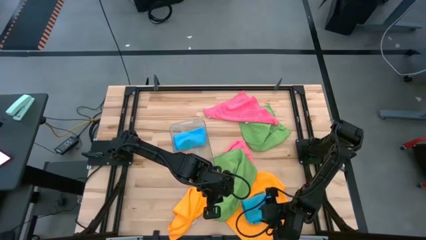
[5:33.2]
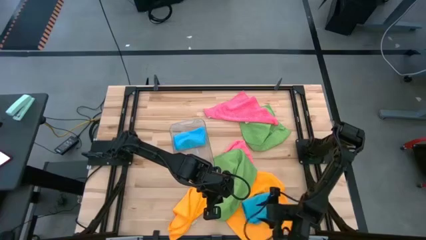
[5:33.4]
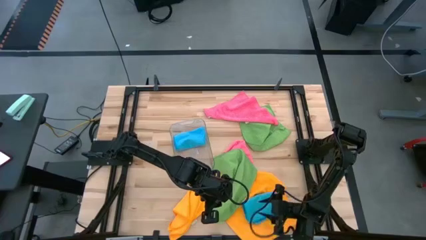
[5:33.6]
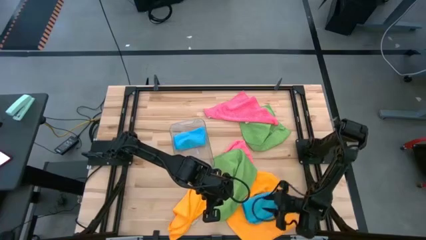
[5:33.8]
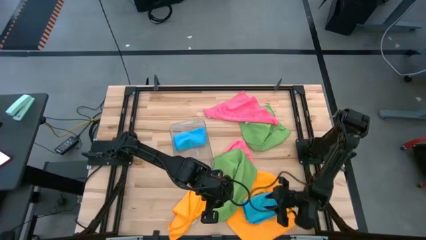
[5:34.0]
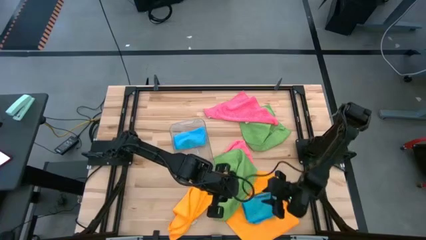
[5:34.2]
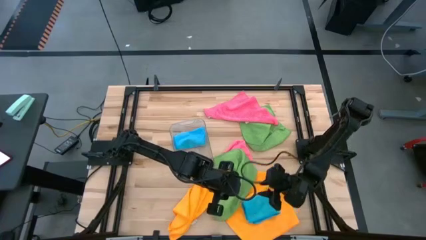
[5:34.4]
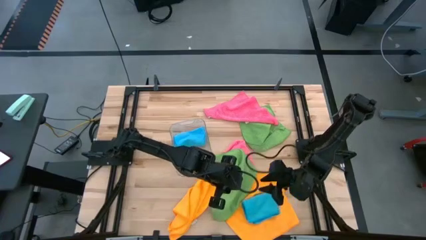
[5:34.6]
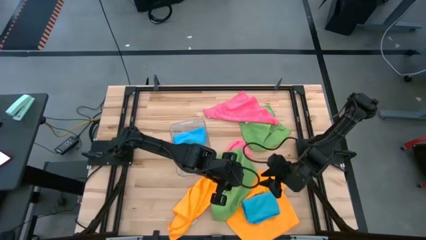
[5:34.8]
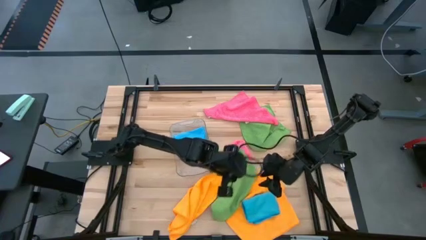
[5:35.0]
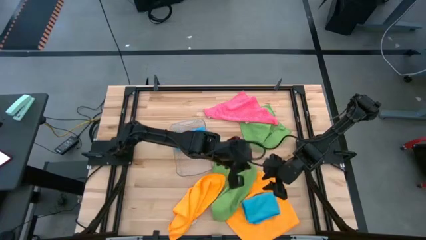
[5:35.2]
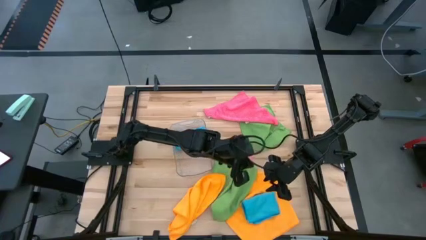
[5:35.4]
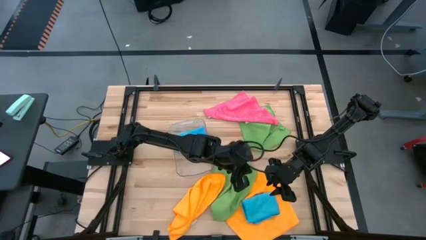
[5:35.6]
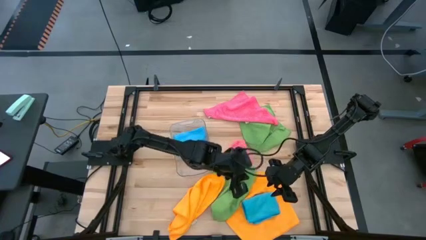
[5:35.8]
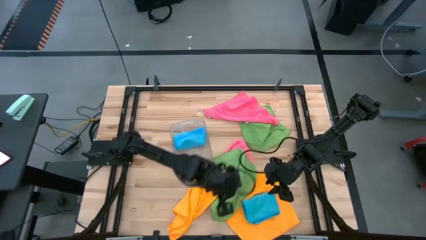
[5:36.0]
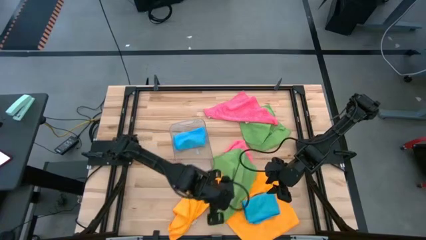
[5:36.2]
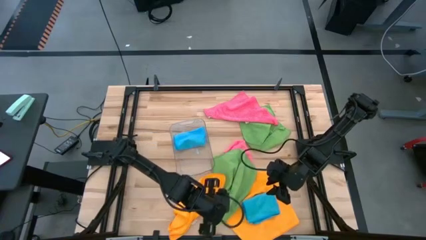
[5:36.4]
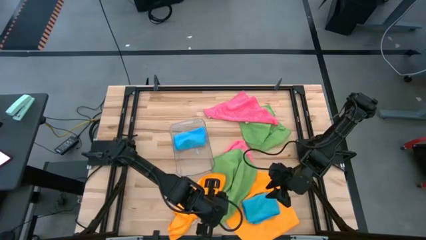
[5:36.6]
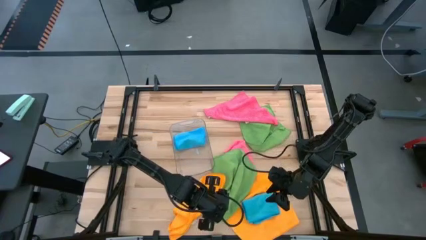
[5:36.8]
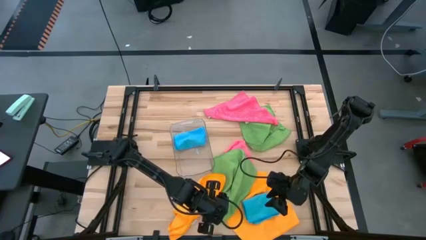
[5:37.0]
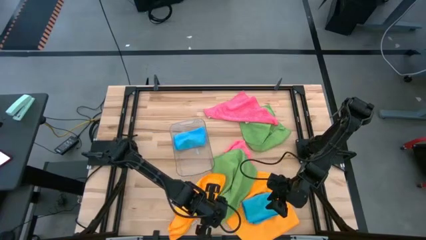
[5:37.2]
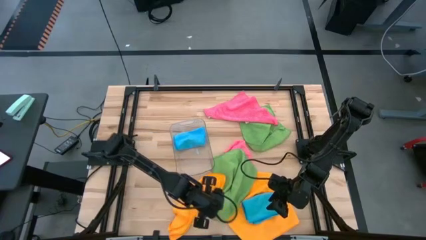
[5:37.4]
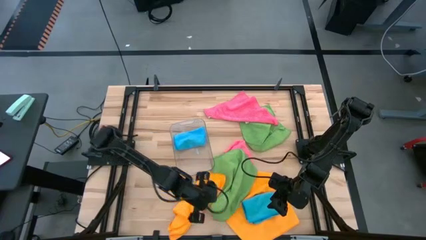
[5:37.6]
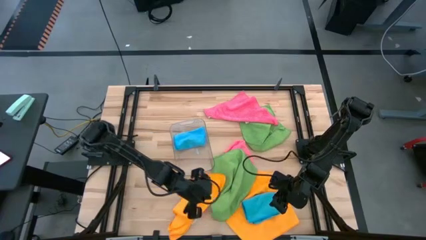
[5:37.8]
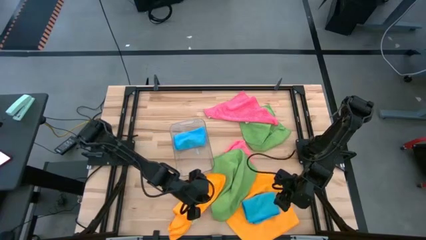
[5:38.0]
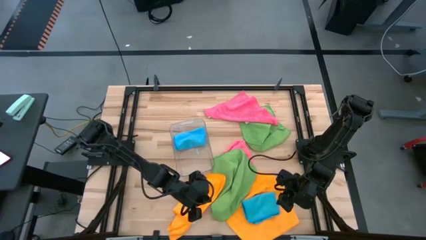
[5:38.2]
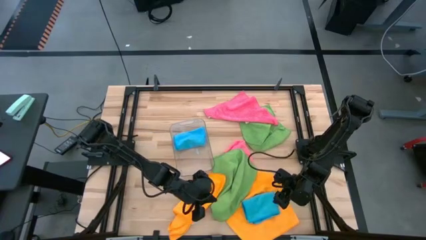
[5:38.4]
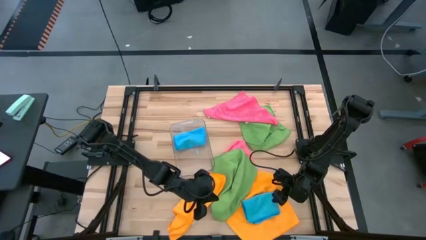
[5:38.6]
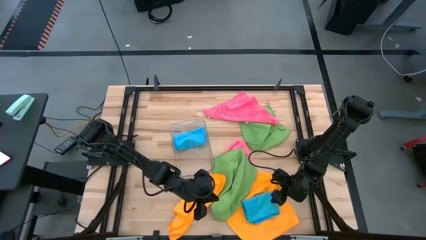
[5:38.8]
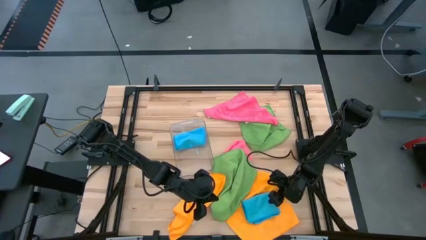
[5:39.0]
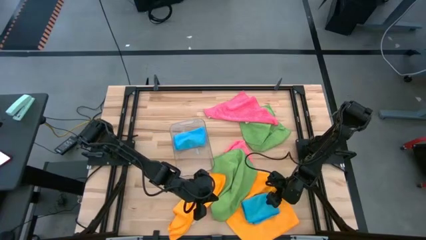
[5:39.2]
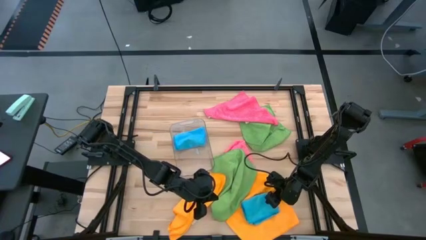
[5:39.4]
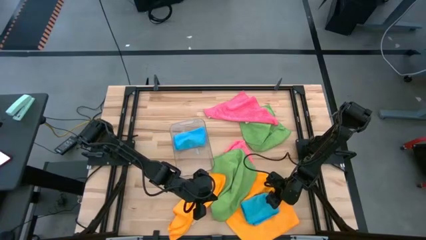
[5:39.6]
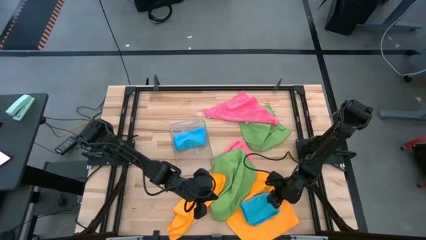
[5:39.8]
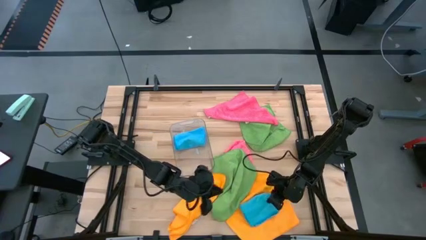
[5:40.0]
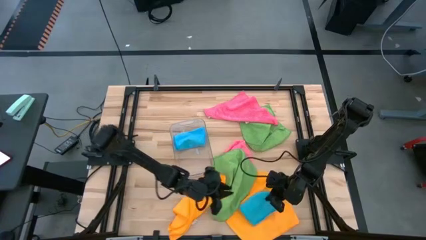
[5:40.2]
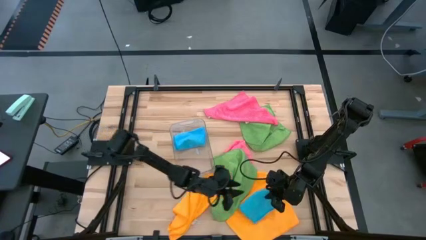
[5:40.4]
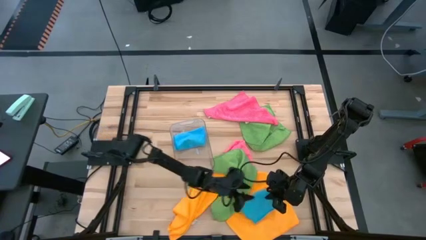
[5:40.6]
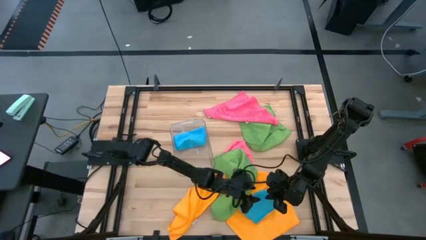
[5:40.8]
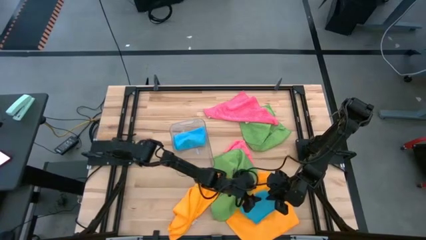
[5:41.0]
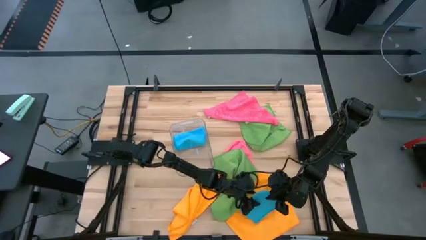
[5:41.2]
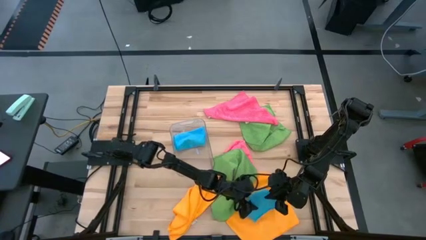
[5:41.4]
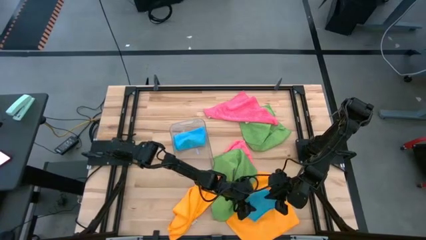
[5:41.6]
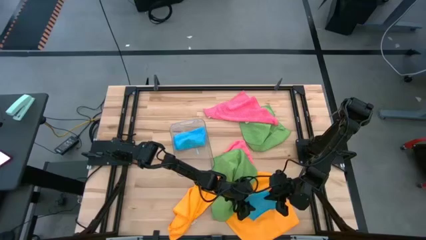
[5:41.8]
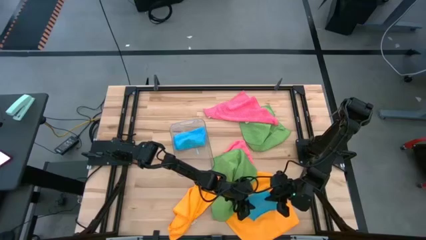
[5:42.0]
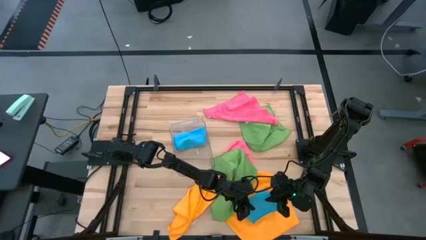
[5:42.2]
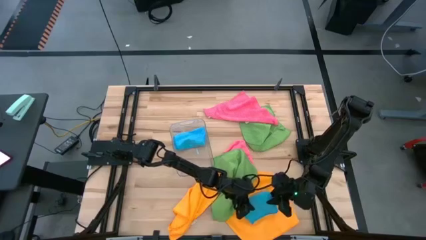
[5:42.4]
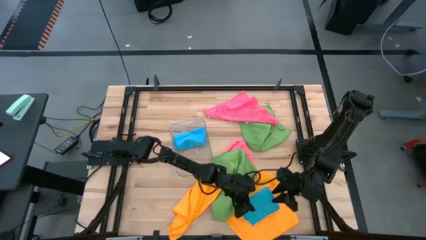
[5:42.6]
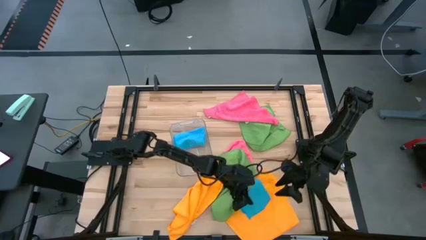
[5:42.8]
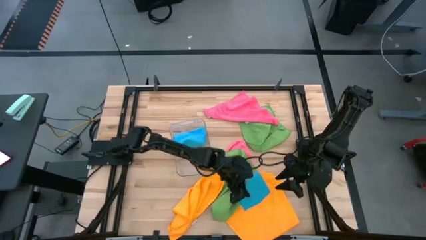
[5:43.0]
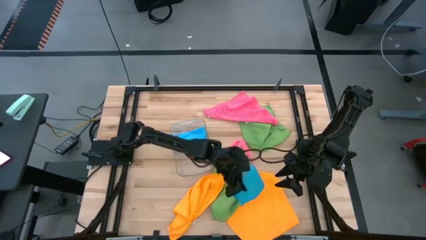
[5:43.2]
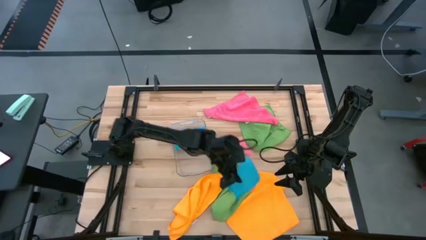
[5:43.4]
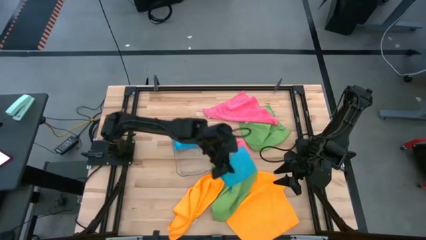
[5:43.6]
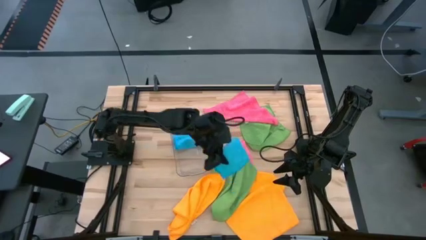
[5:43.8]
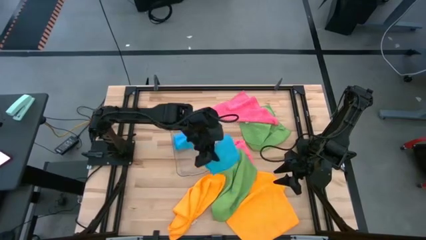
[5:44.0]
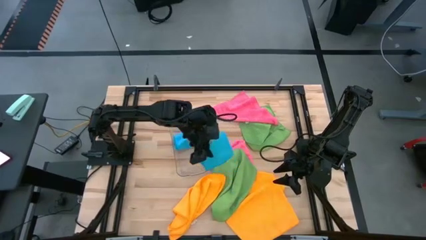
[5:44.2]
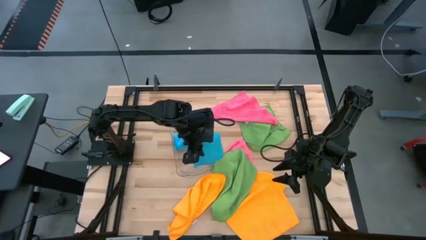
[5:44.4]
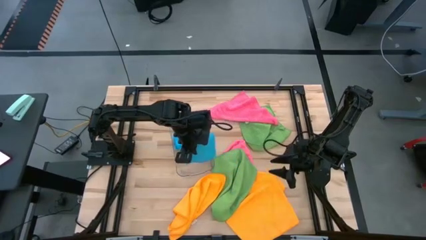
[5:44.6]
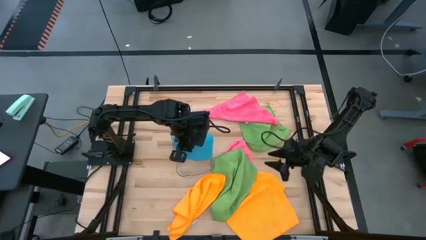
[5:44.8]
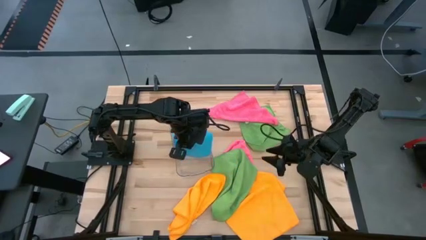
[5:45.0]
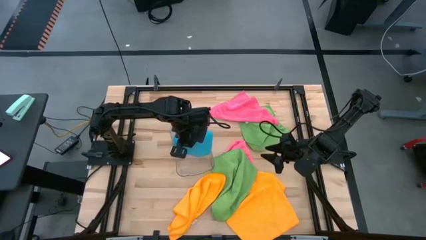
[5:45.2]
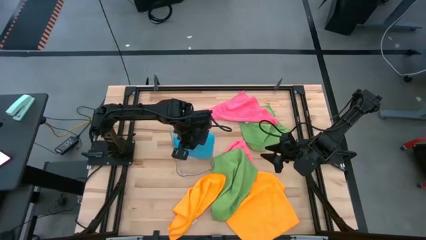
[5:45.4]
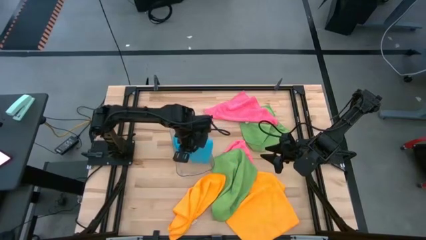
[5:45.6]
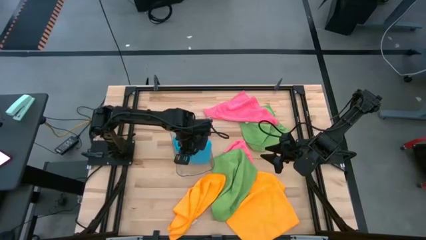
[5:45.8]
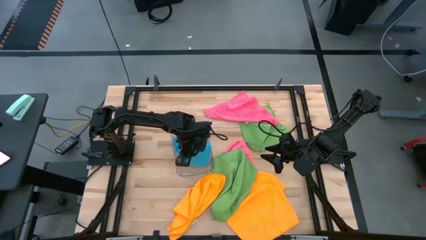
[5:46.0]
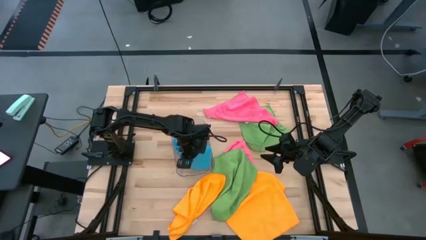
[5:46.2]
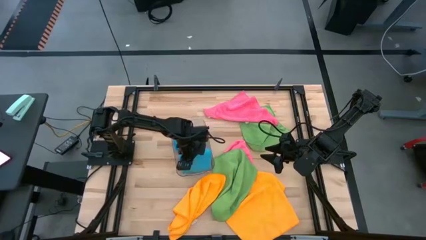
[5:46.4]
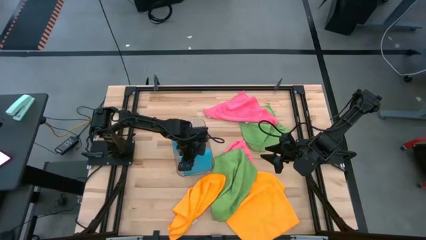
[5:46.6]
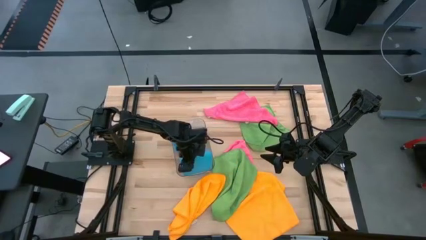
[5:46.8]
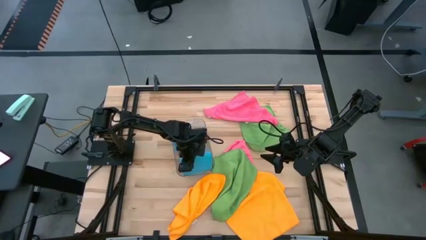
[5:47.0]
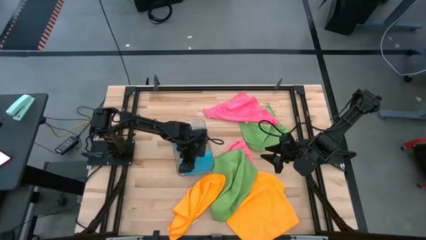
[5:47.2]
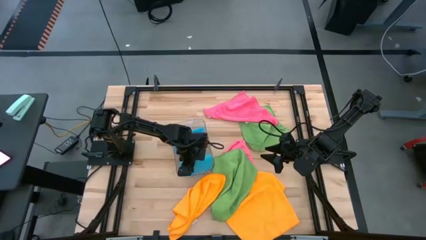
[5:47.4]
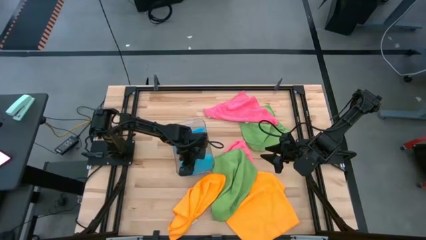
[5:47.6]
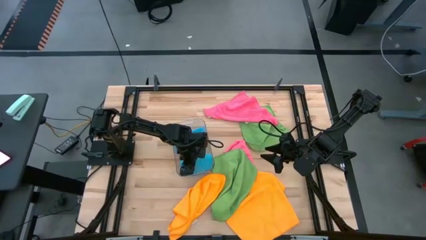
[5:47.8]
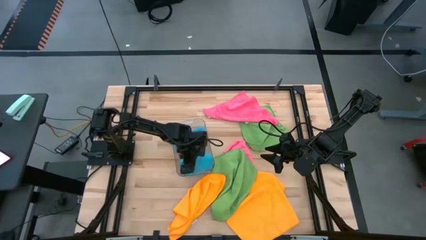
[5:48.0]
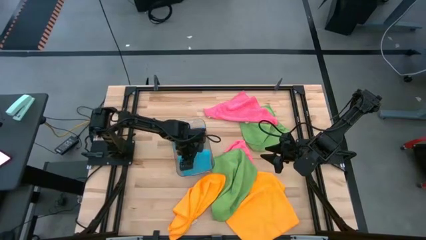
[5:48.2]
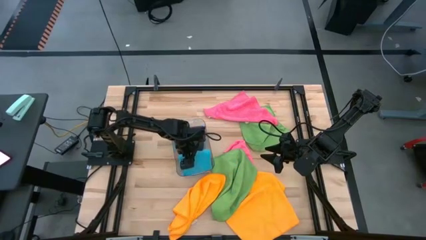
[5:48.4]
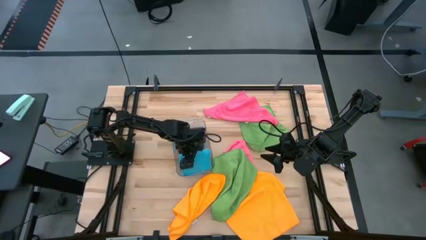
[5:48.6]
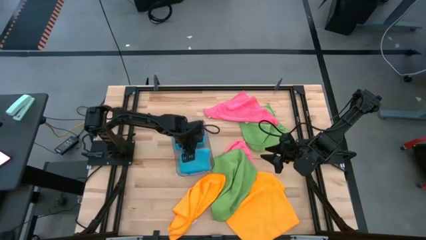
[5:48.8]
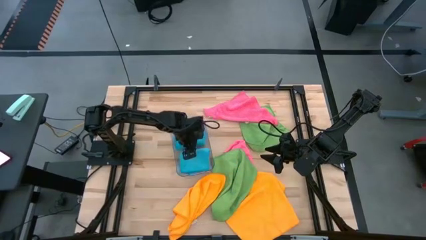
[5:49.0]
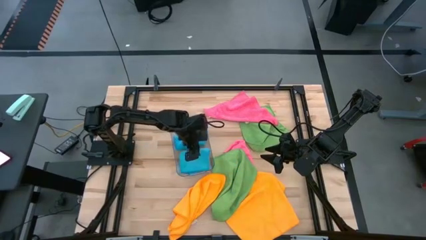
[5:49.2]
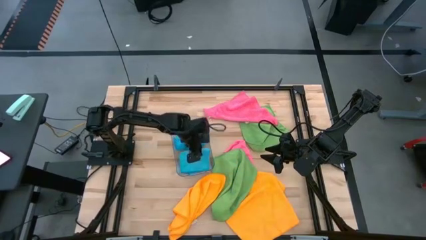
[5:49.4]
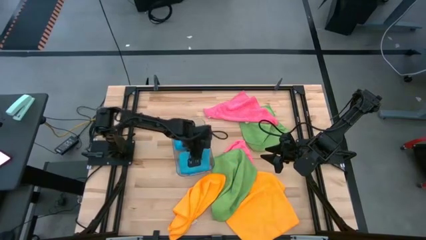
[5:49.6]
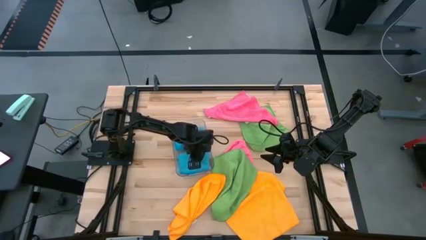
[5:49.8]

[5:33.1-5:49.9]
Task: Fold microfiber towels
Put the blue towel into the transparent bin
